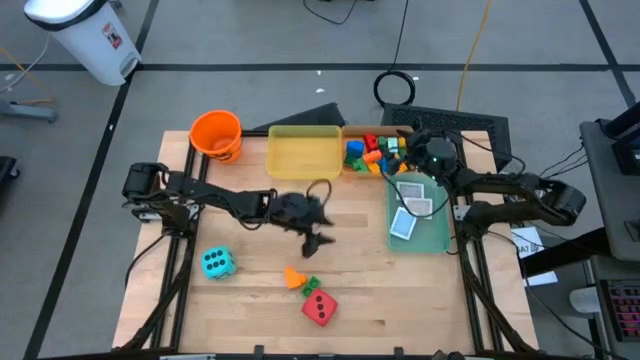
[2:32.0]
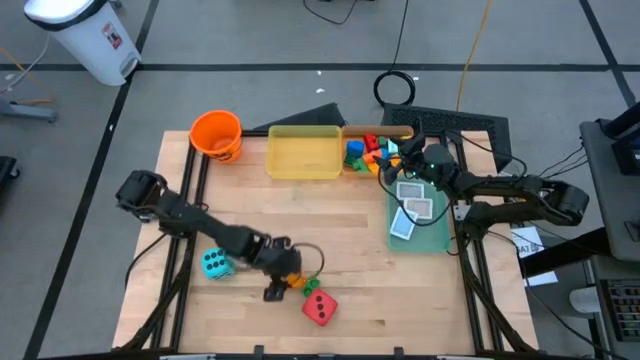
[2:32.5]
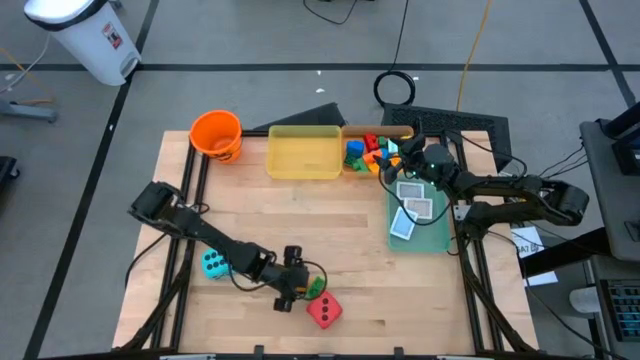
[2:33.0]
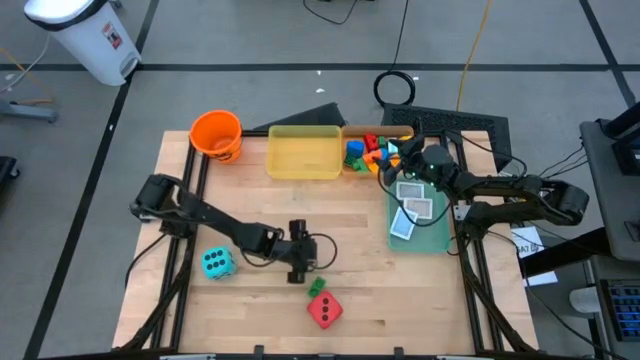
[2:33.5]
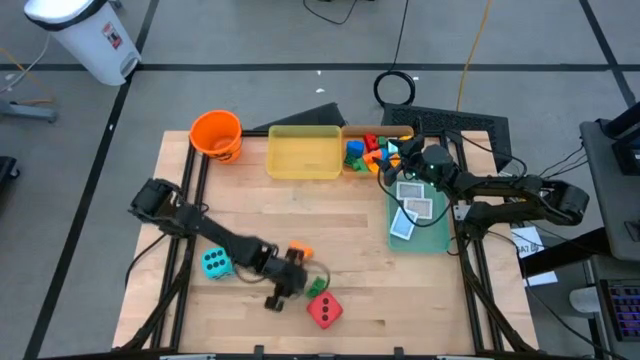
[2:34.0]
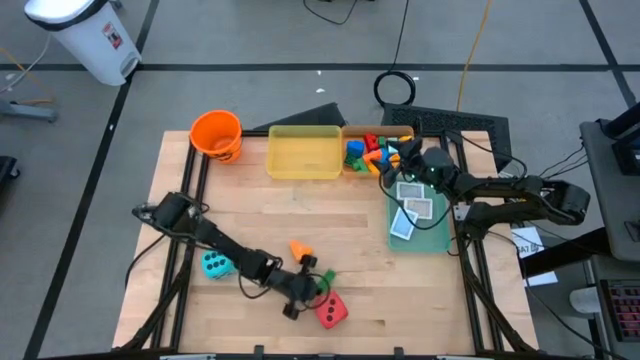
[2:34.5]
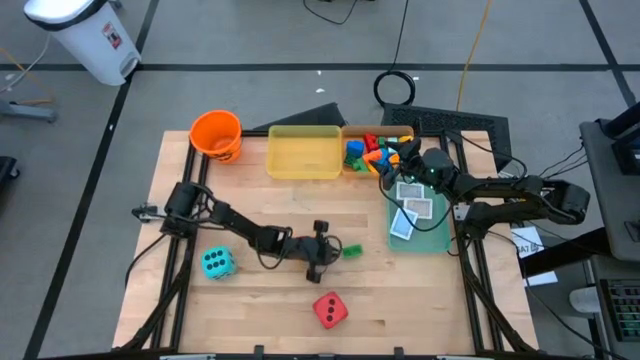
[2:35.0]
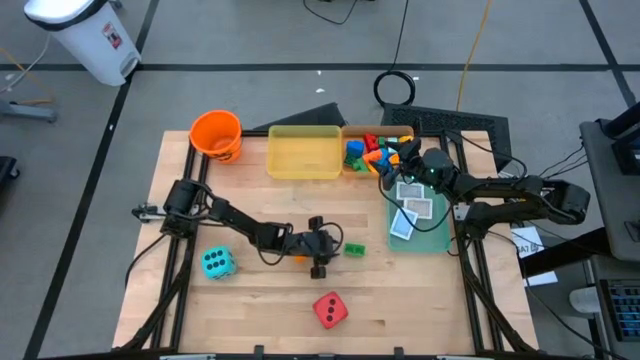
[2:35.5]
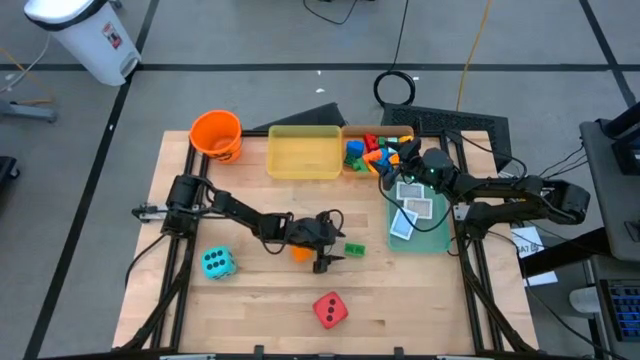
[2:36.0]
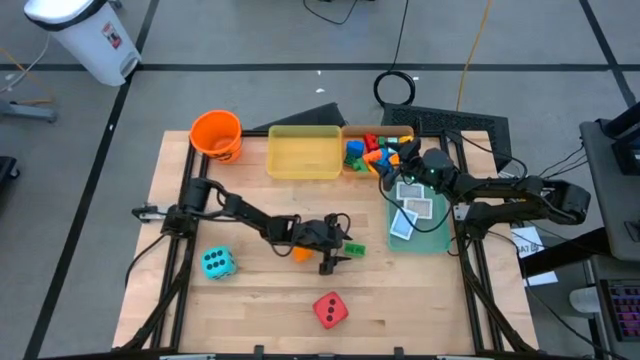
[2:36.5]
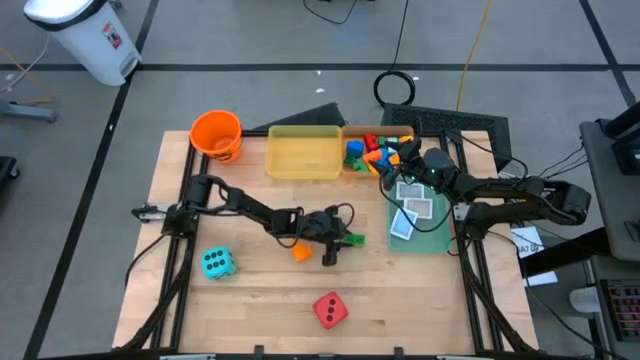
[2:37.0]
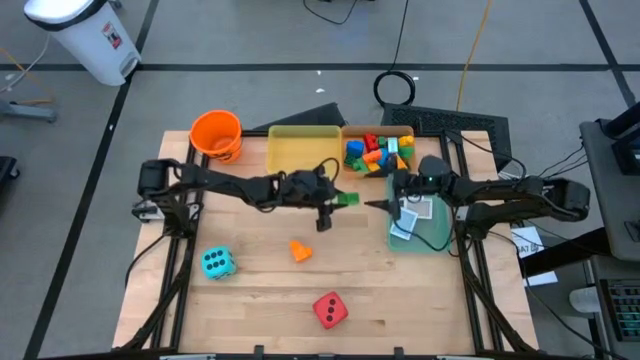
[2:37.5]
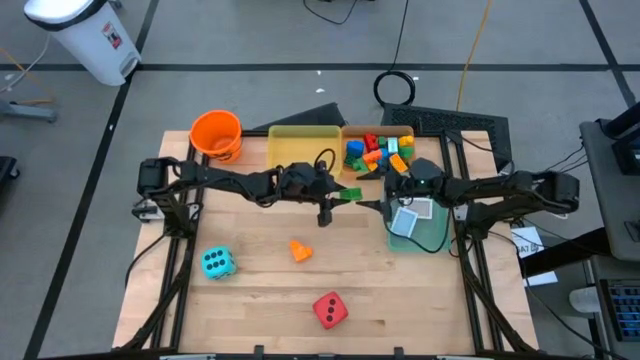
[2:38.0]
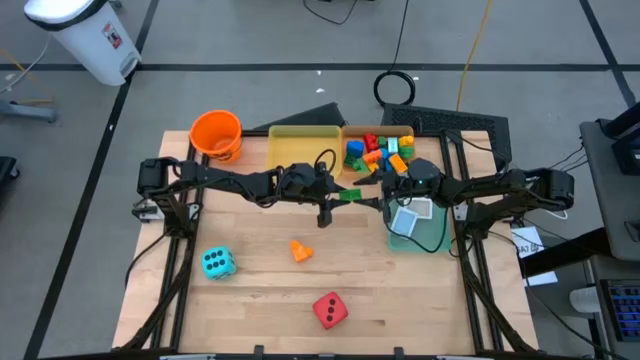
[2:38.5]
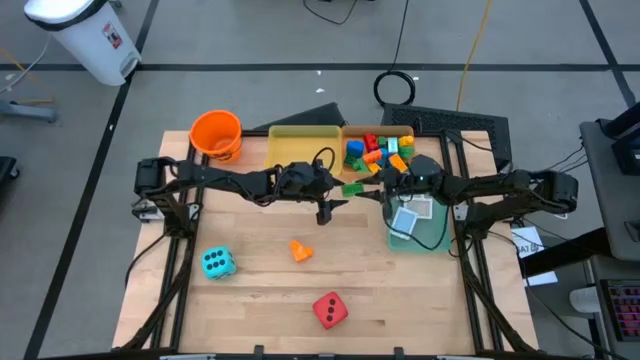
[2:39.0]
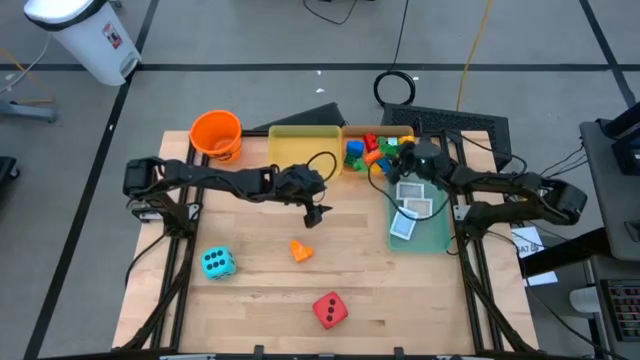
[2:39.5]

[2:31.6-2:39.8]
Task: Pick & Place Toys
Put the green game piece into the orange bin

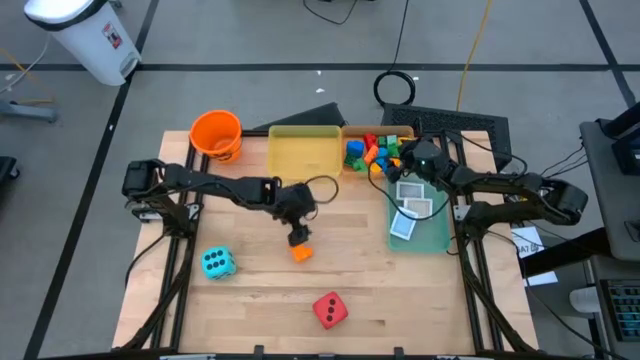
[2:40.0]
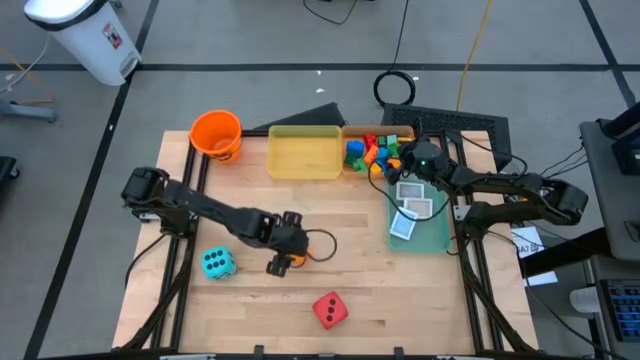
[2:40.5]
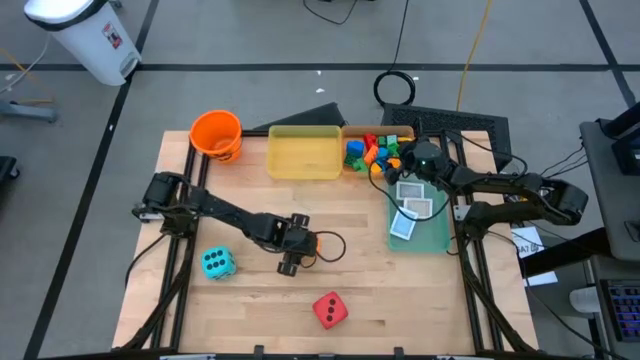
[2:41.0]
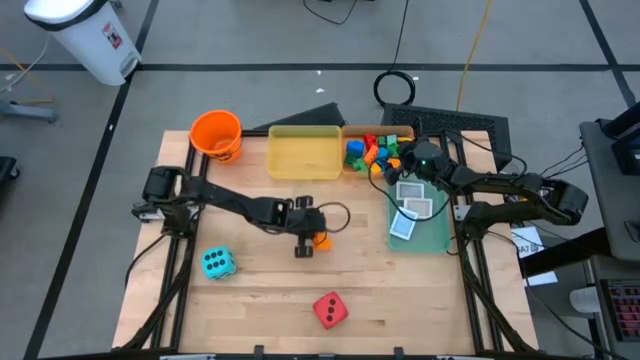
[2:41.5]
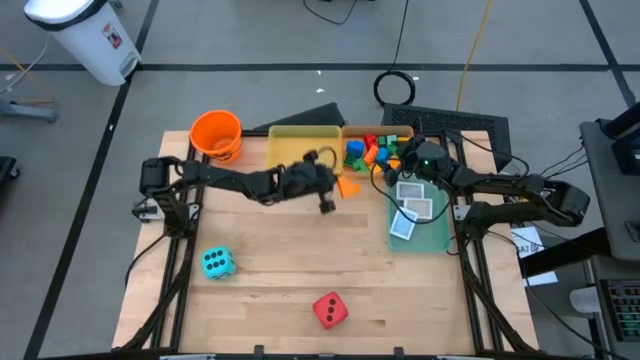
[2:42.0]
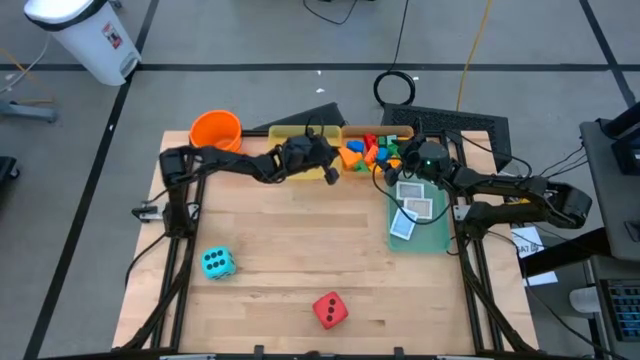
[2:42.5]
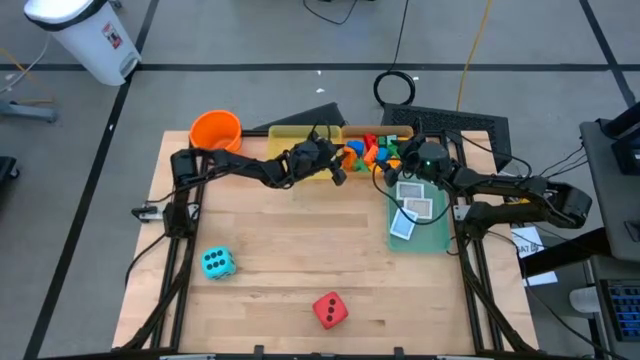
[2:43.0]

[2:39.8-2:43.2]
Put the orange game piece into the orange bin

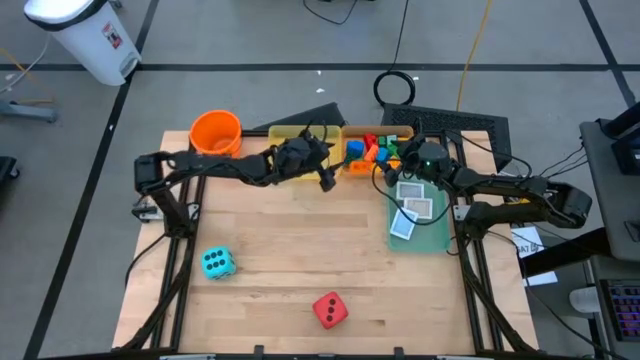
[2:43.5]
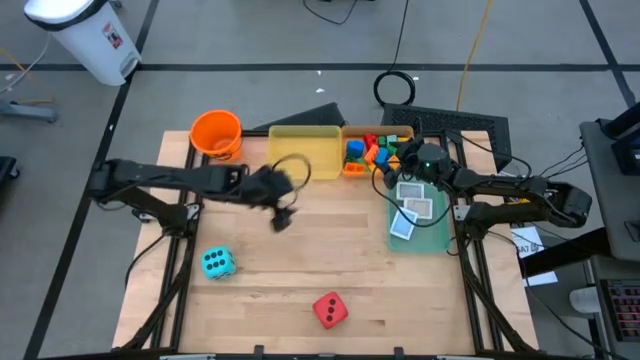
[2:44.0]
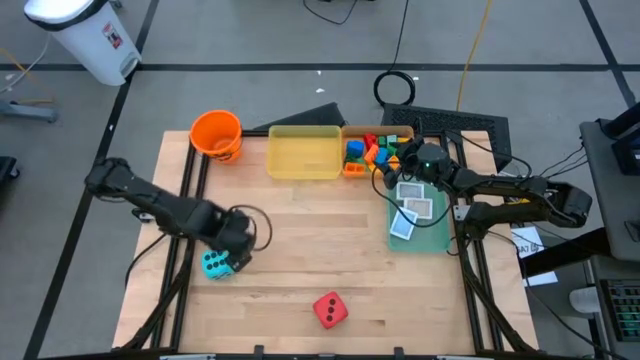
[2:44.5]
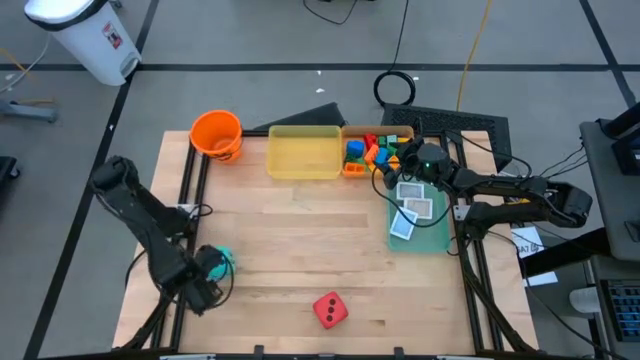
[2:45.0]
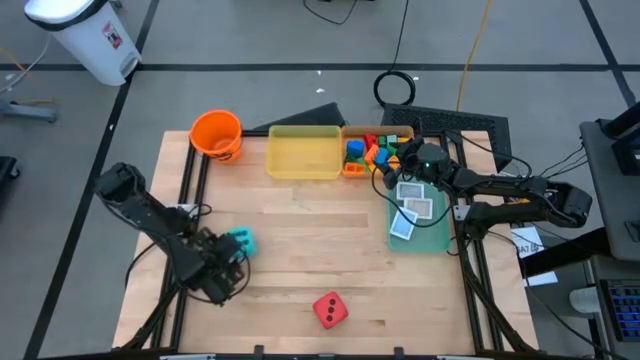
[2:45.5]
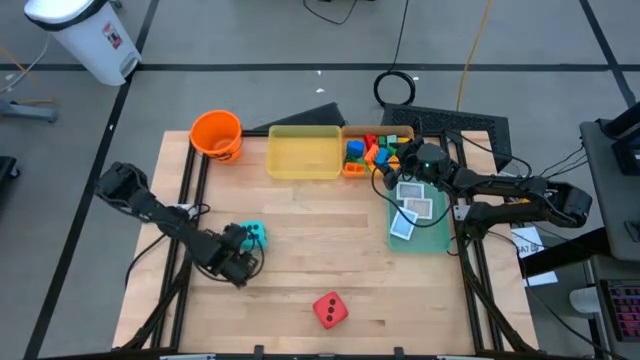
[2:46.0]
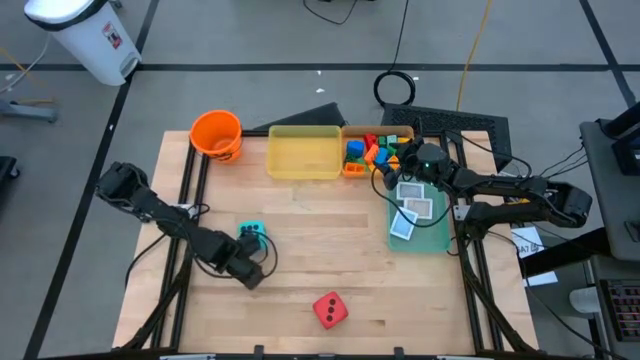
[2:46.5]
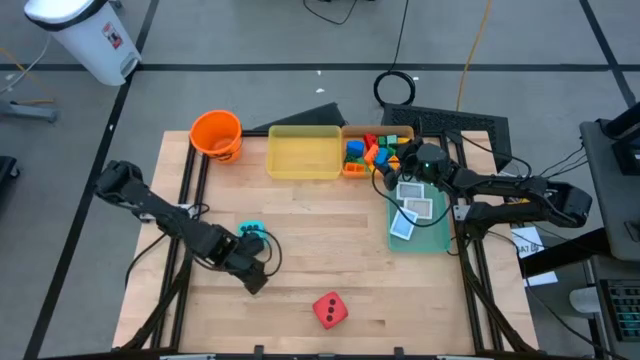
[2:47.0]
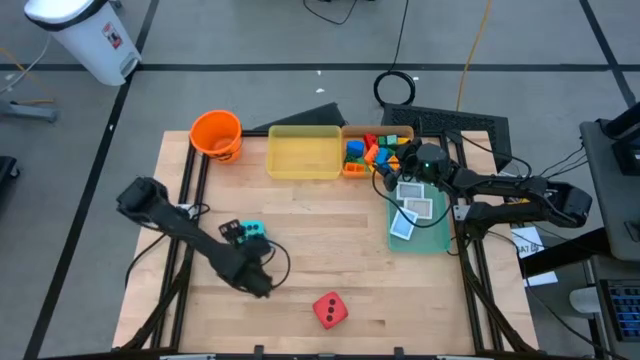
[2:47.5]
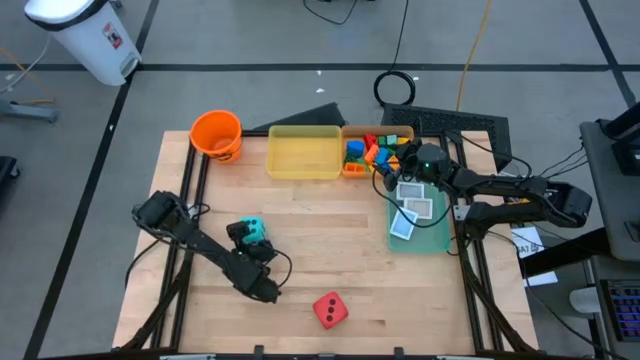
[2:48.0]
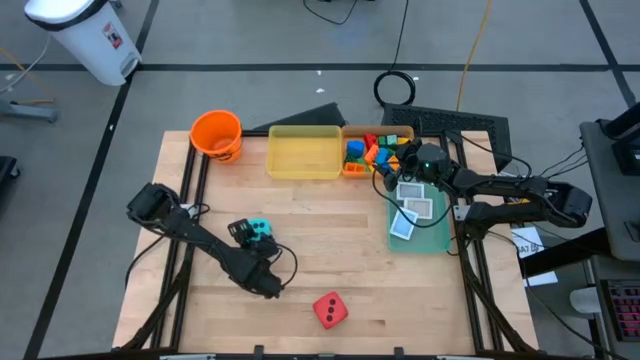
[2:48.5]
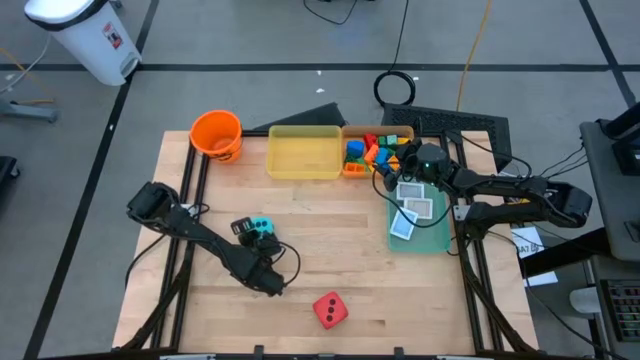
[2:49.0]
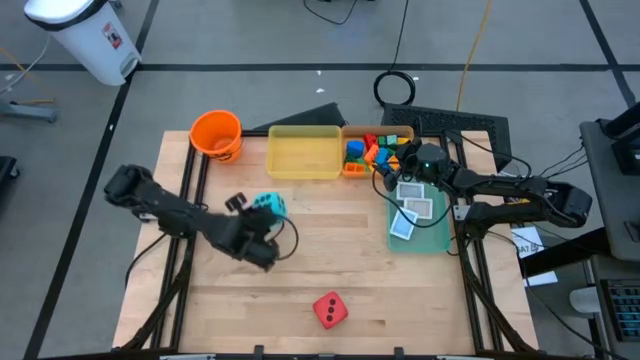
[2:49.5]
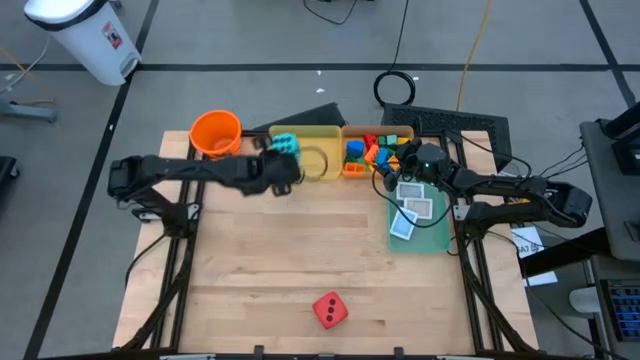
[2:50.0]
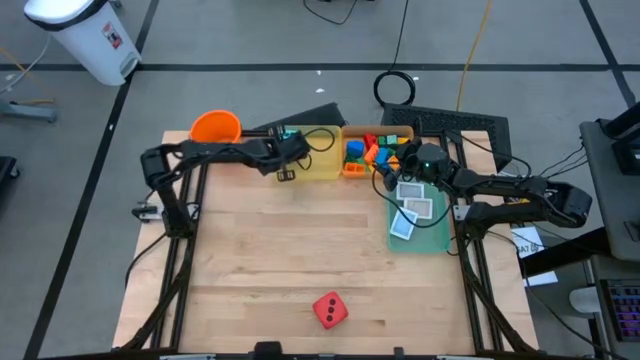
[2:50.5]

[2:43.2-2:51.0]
Put the blue dice into the yellow bin

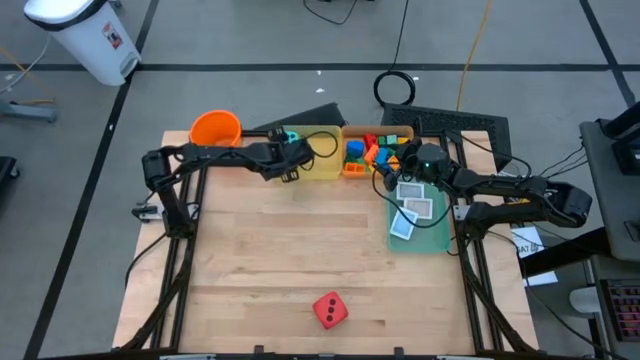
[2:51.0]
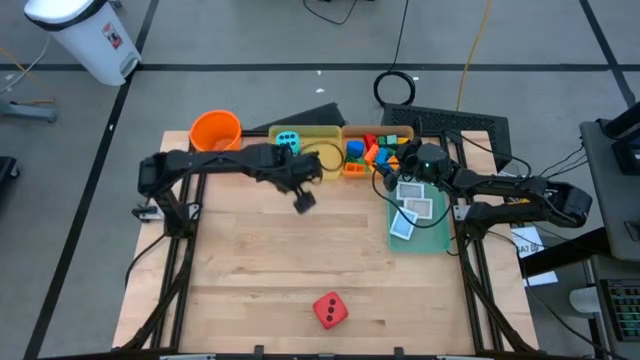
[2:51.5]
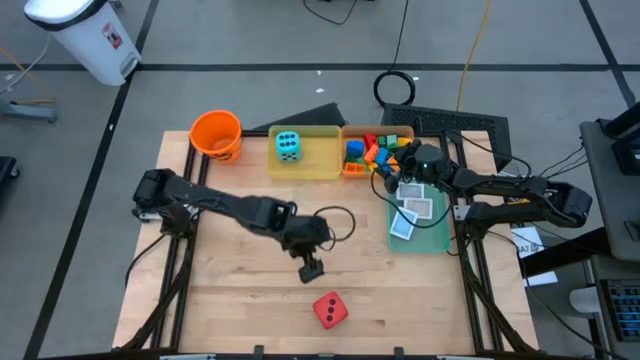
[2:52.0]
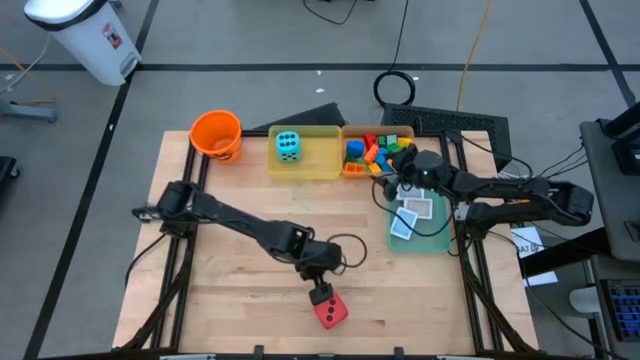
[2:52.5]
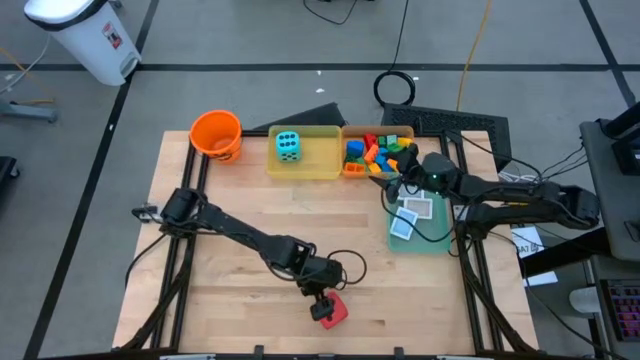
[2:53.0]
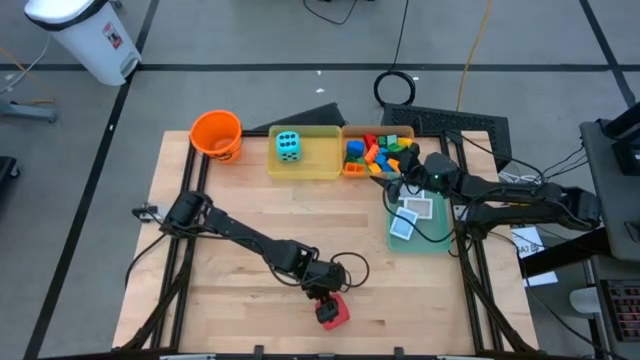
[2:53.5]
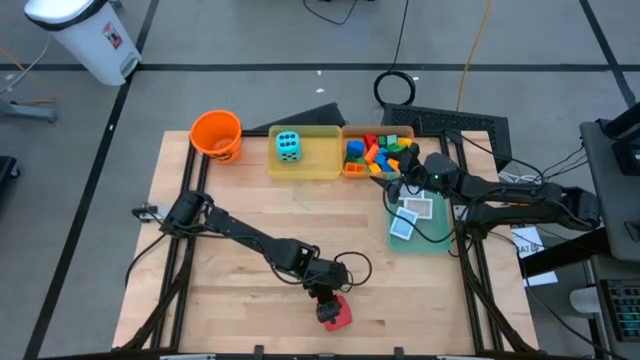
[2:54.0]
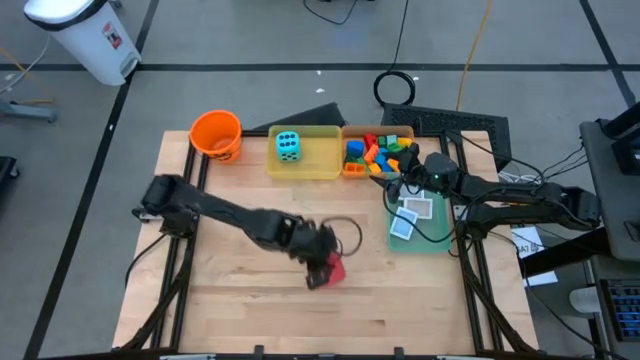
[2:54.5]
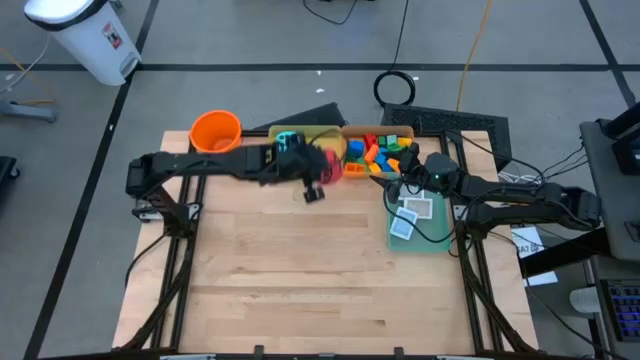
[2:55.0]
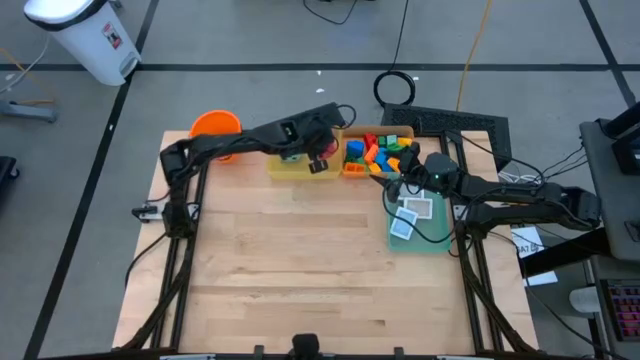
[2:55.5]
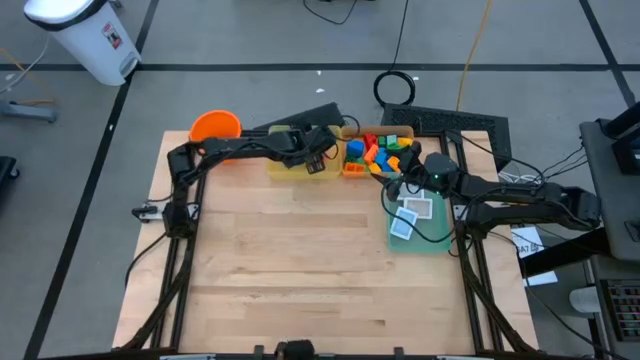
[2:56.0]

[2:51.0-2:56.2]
Put the red dice into the yellow bin
